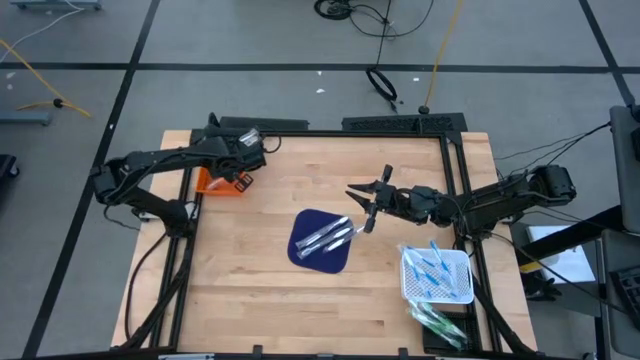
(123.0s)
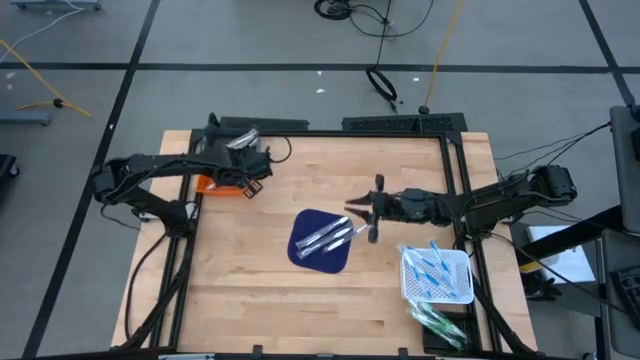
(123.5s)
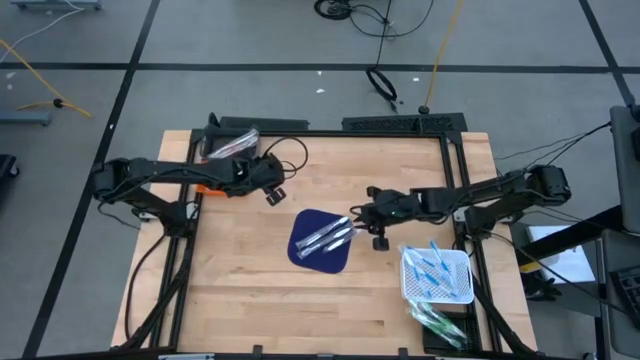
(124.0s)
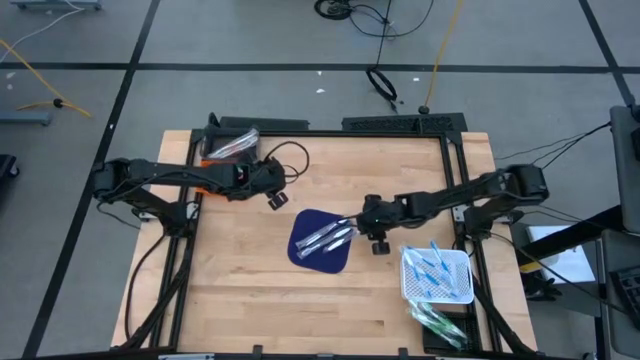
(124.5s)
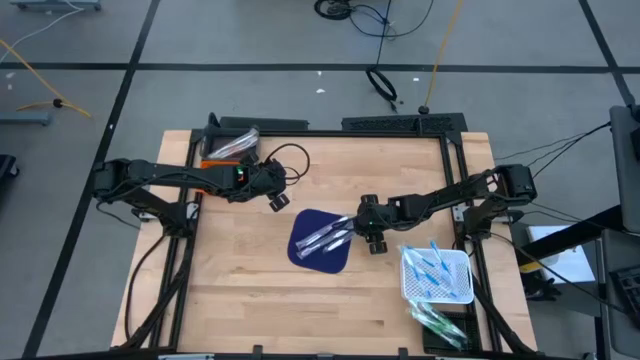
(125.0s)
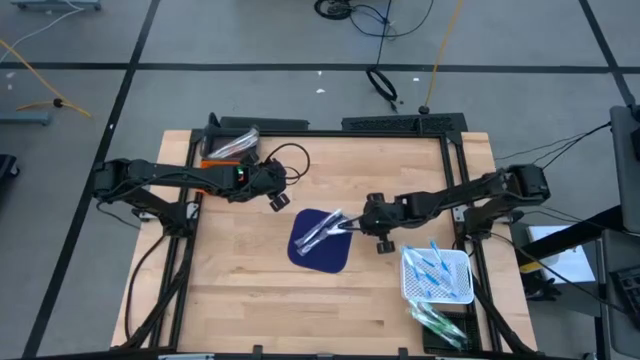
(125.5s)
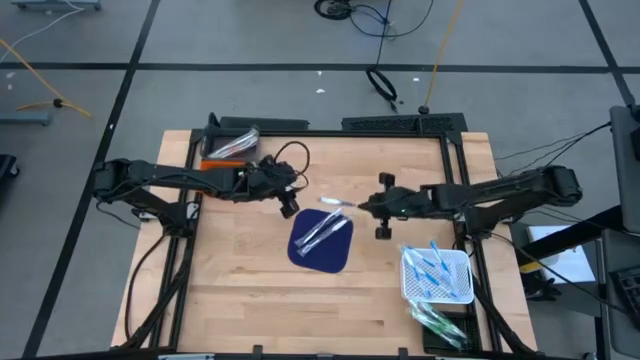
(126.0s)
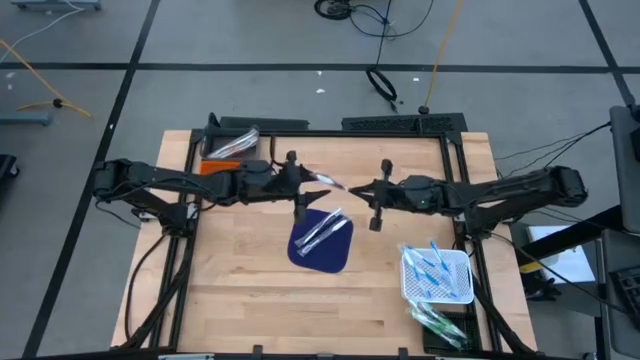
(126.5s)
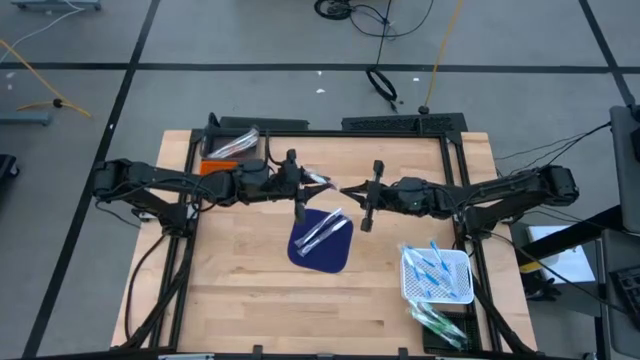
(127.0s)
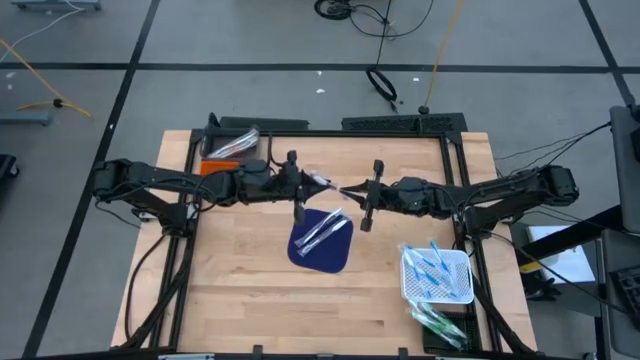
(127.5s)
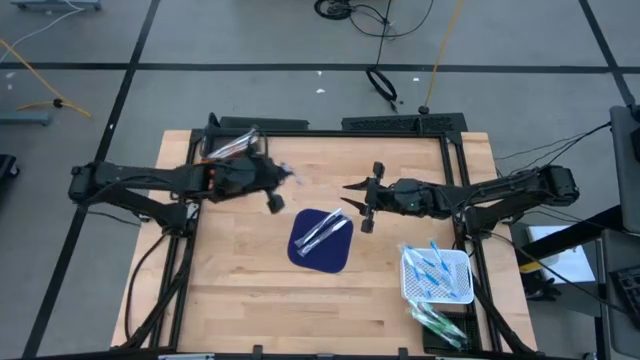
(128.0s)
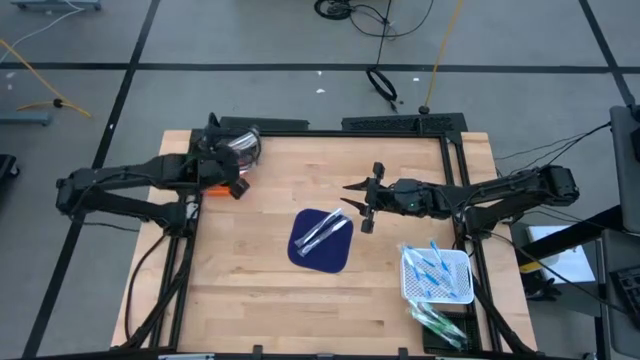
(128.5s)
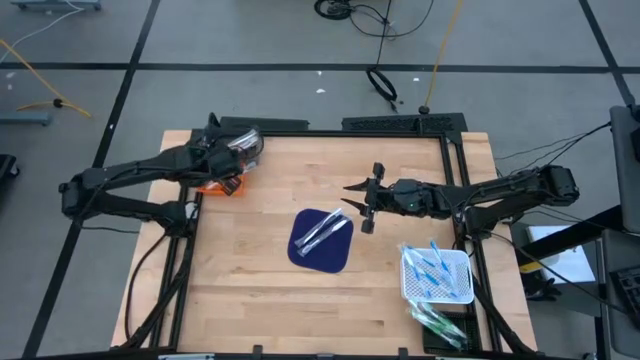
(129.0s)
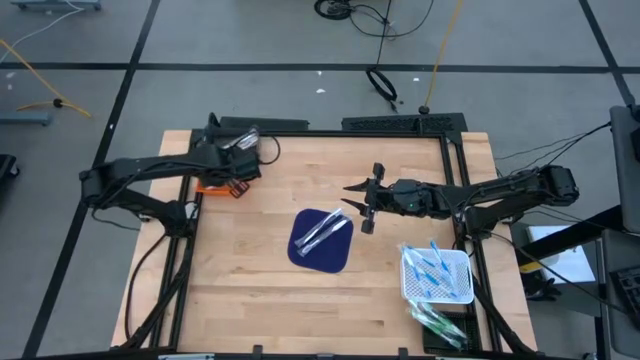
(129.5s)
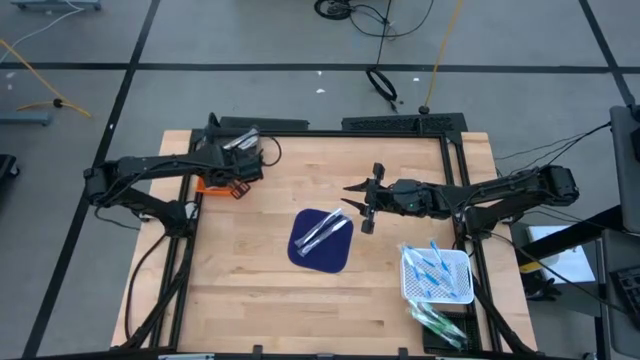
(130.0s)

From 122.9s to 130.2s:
Task: Pick & Place Toothbrushes
Put the purple toothbrush into the orange bin

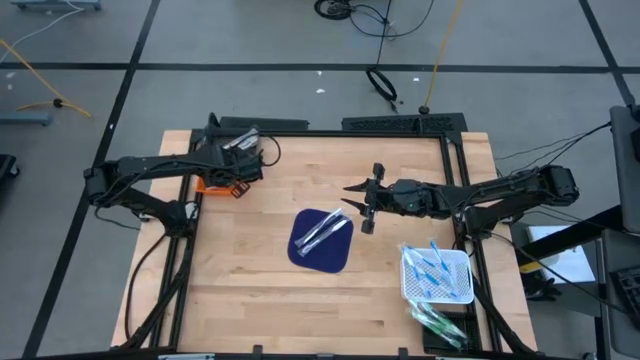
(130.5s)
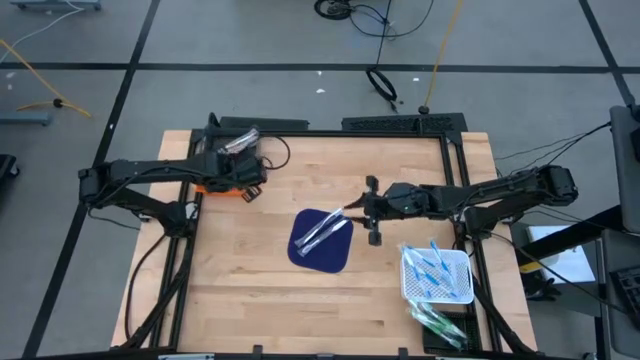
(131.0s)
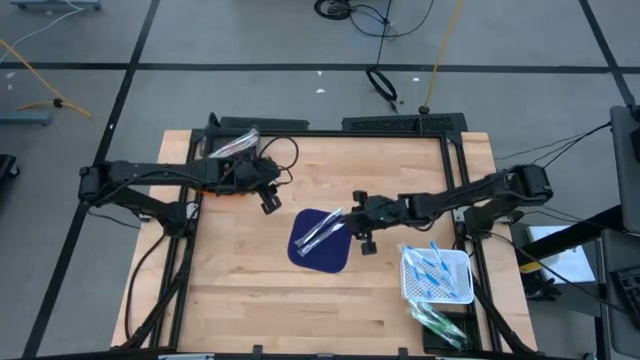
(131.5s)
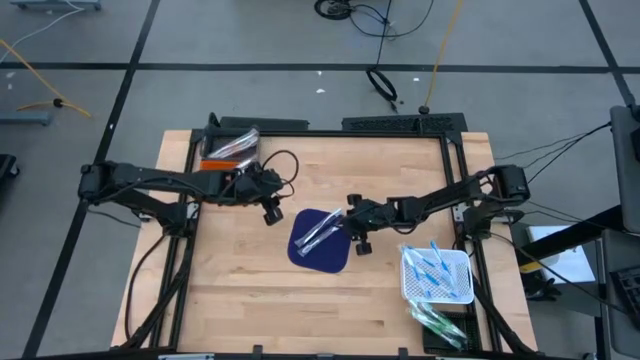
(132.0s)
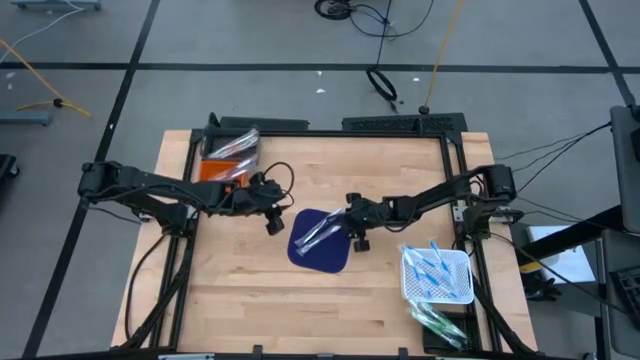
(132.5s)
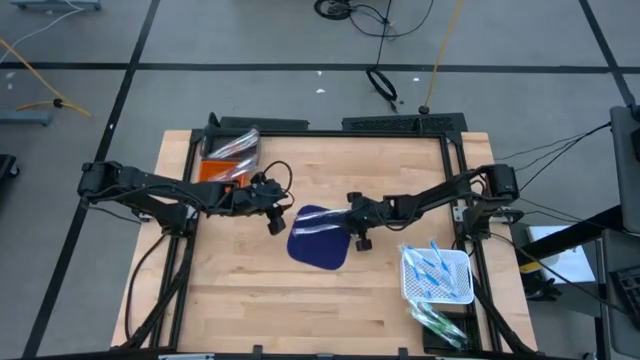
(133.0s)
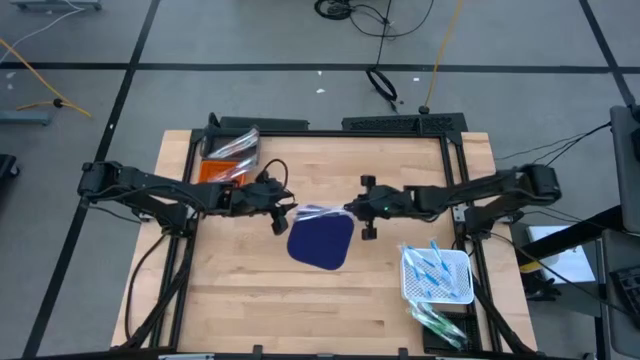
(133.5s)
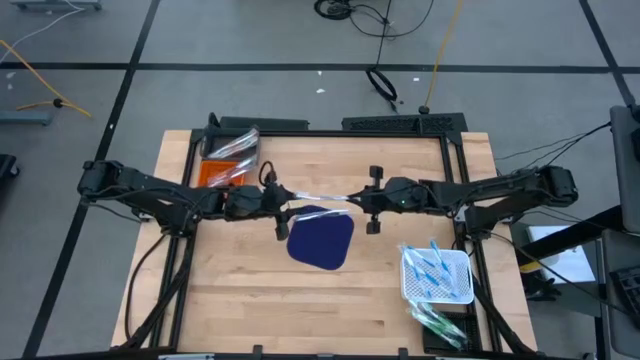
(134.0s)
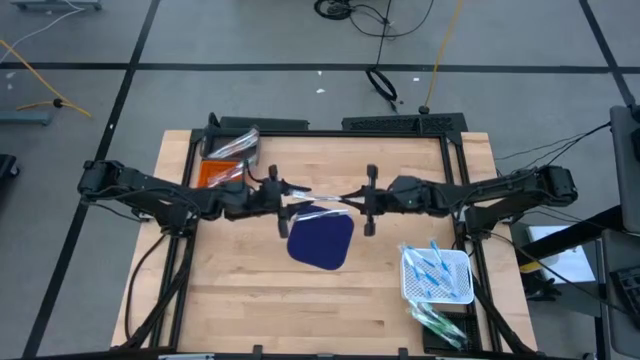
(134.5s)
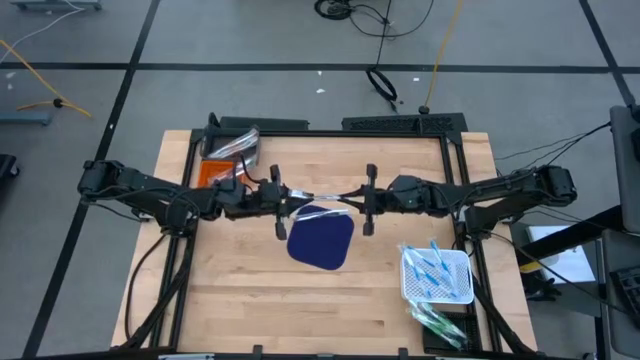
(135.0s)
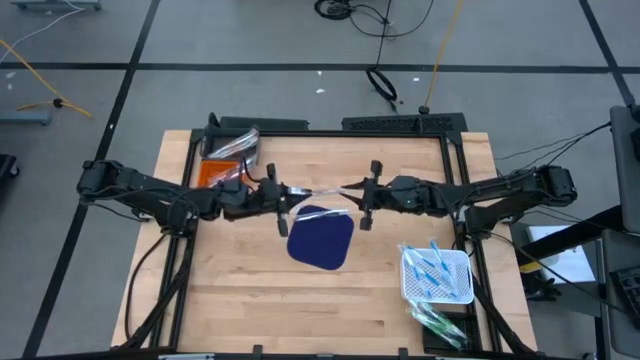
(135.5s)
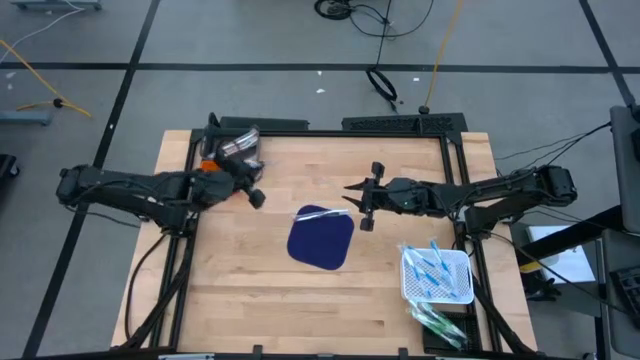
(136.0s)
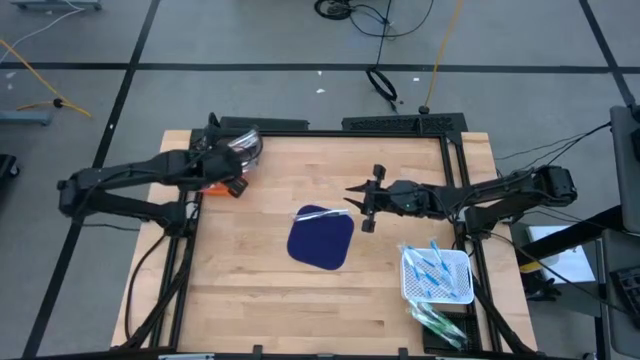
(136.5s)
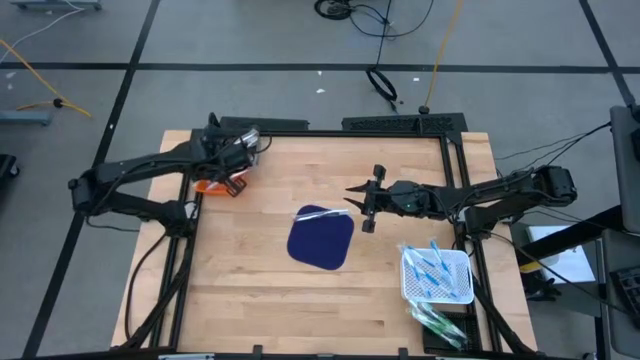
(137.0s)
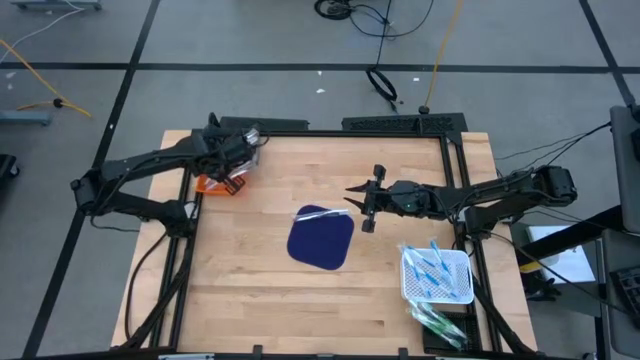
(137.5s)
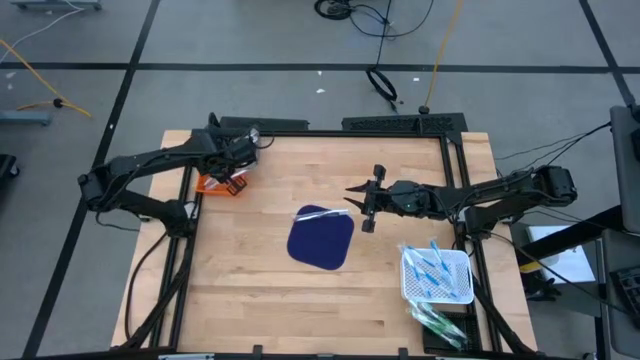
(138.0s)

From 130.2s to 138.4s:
Put the purple toothbrush into the orange bin

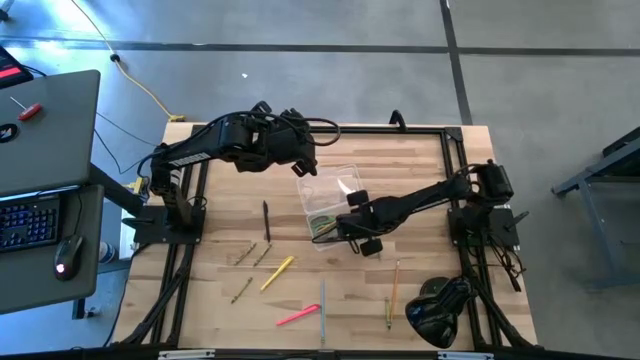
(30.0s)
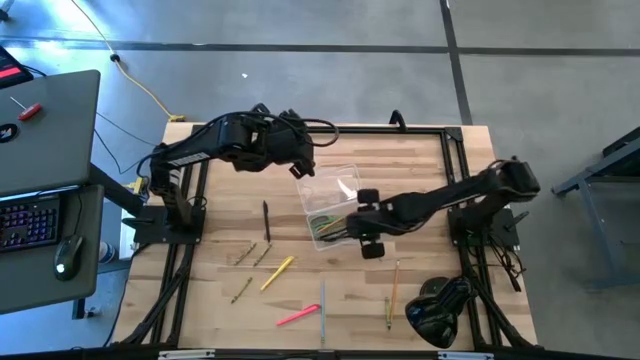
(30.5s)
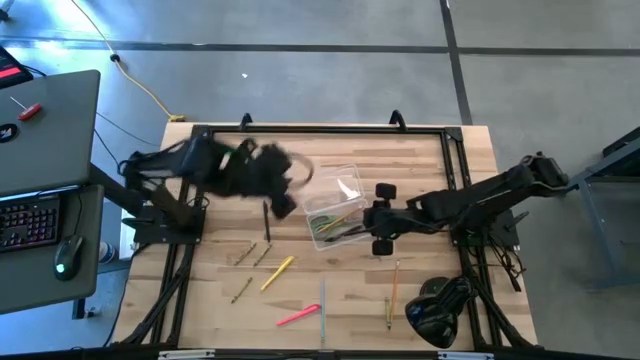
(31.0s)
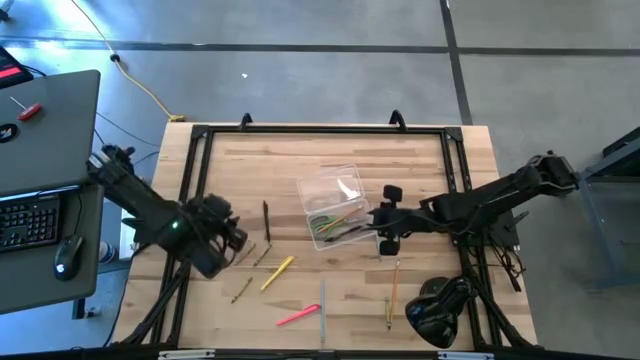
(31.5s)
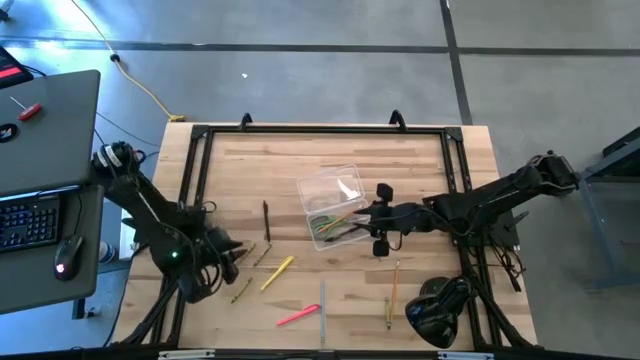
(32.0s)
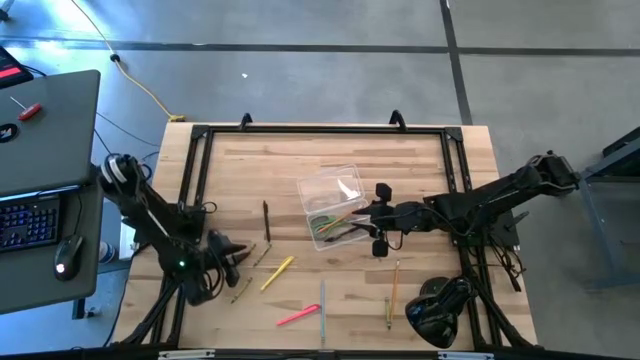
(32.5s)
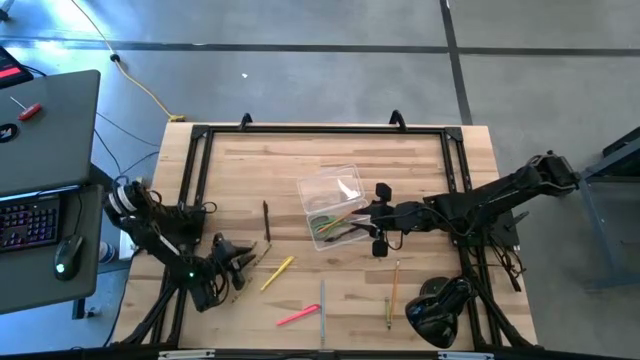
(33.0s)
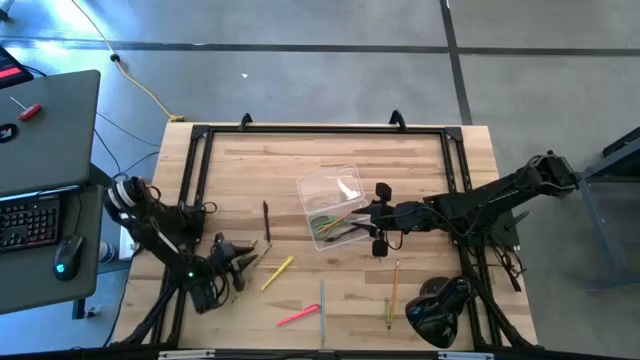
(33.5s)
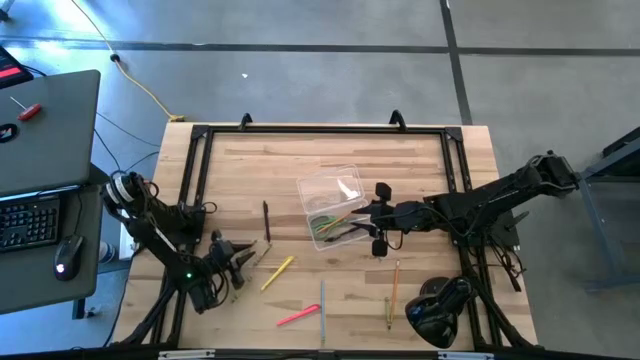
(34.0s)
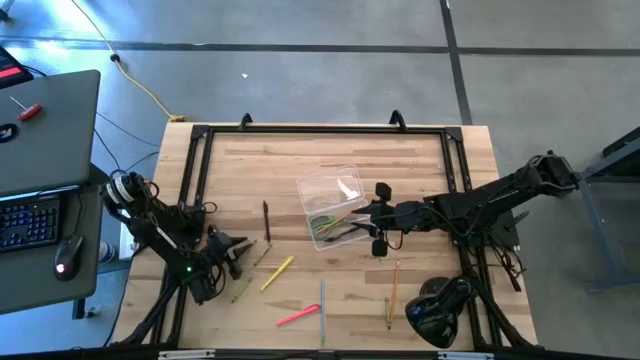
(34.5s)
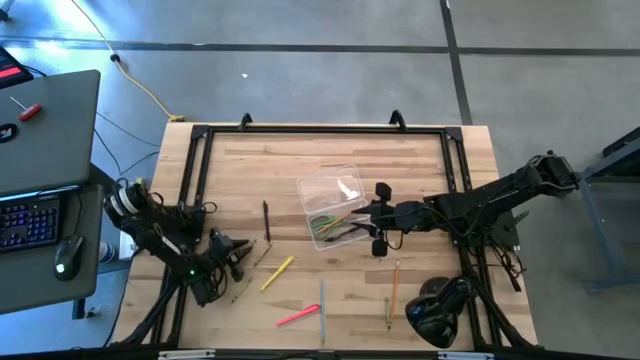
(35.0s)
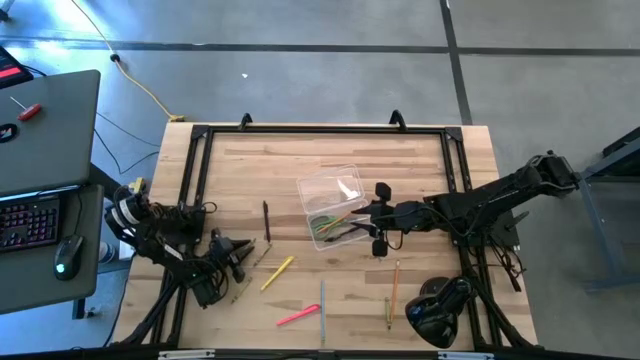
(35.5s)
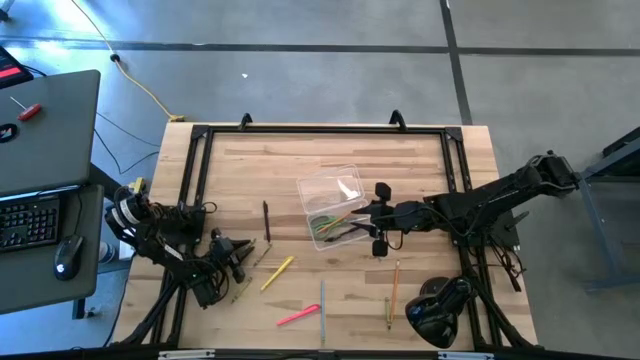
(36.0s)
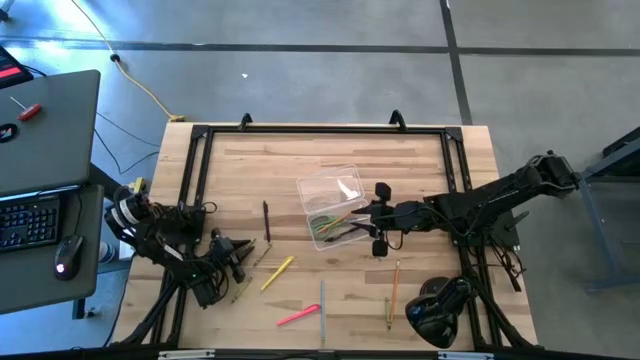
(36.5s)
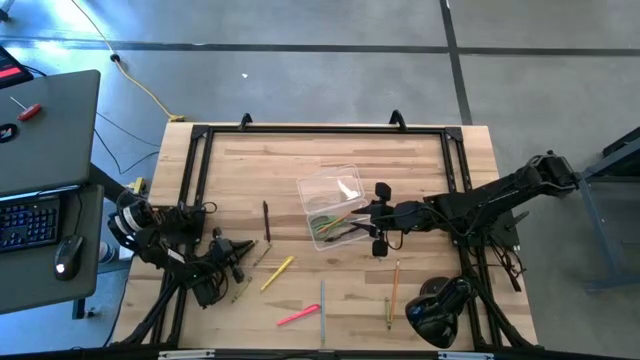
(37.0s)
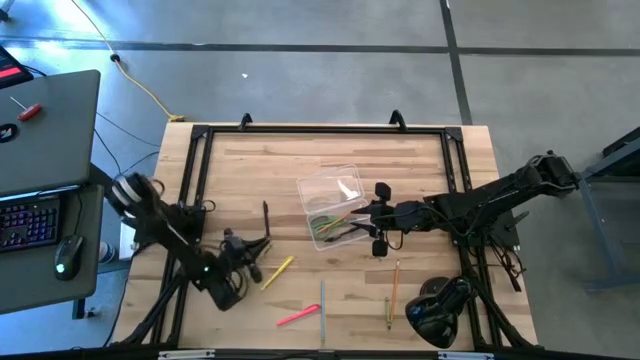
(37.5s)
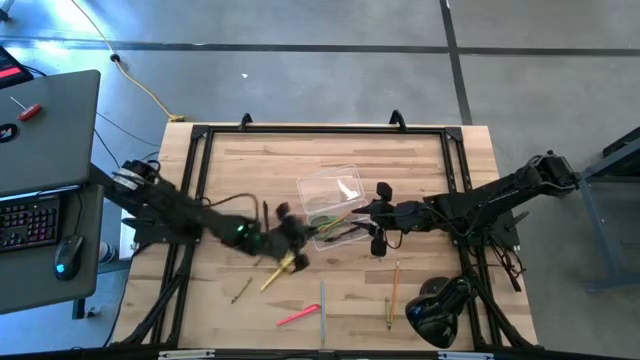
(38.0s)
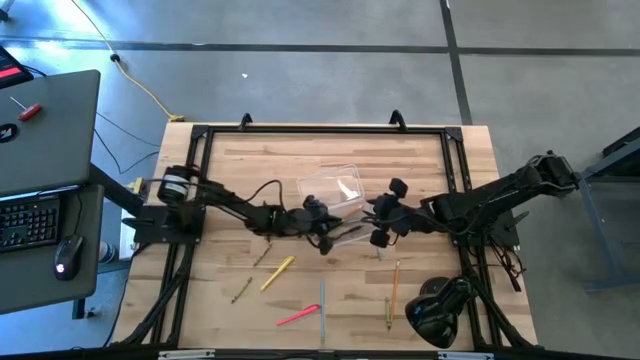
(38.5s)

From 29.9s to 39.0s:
Task: Pick & place school supplies into a supply box
Put the green crayon into the supply box
